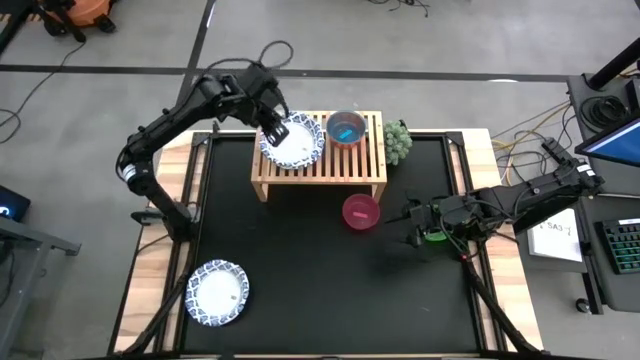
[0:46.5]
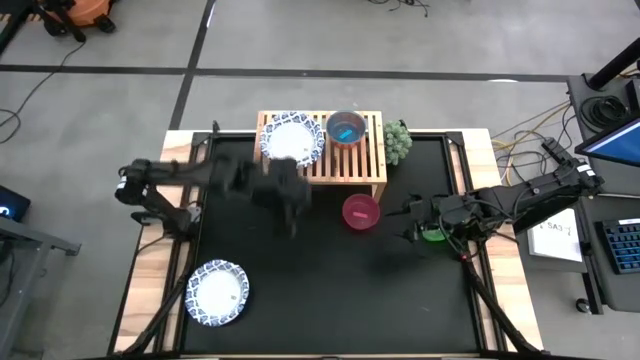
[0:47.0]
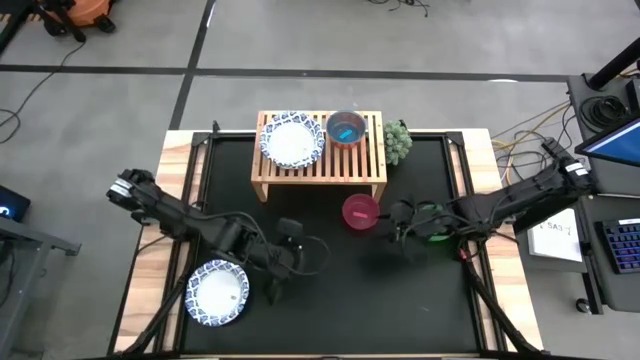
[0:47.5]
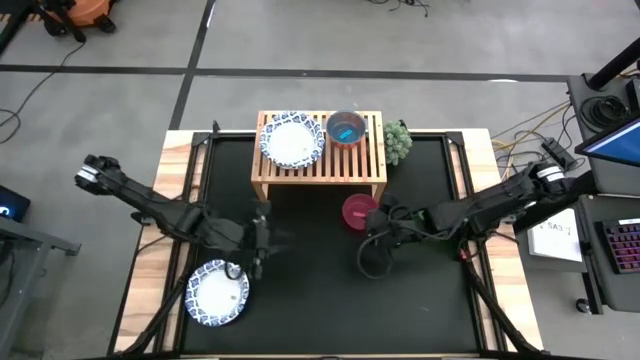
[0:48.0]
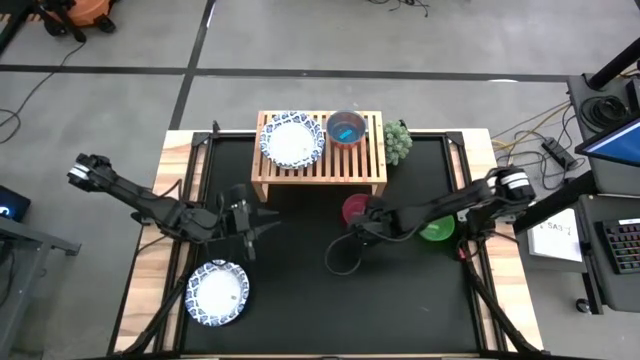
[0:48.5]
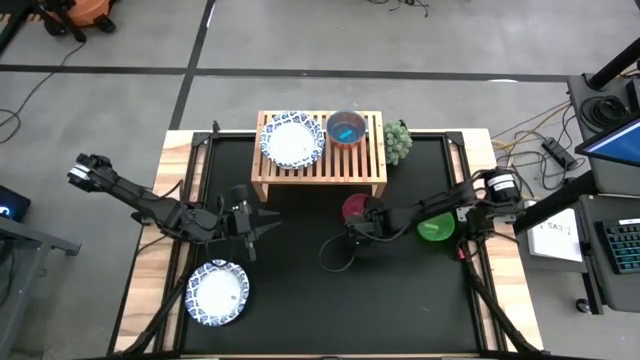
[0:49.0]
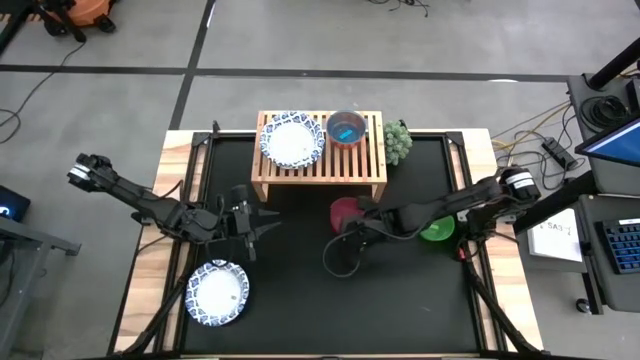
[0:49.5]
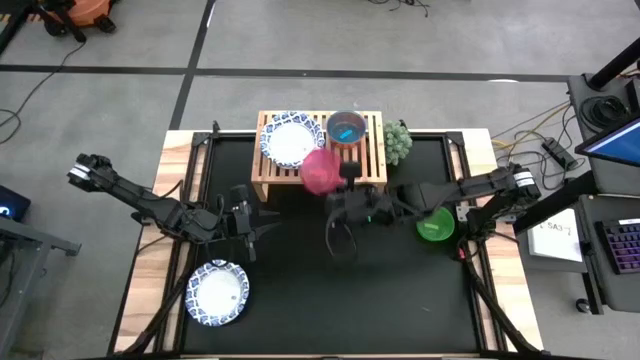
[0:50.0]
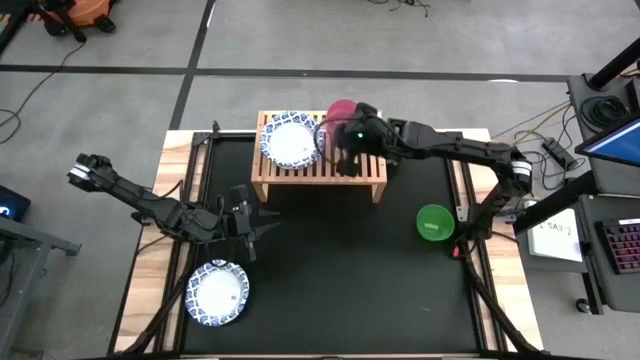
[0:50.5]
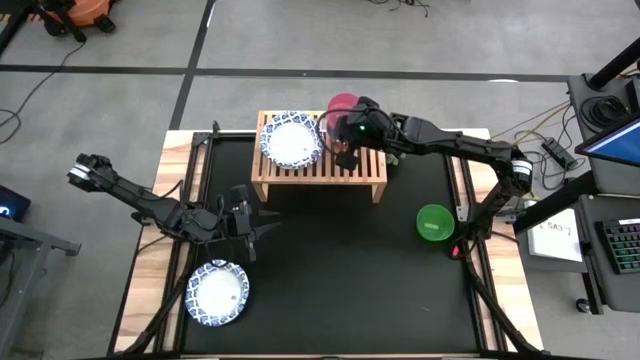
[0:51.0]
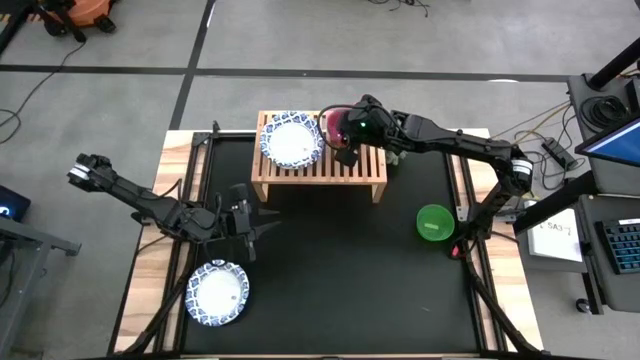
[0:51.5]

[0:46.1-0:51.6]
Task: Place and stack bowls onto a shelf
Stack the pink bowl on top of the other blue bowl on the shelf

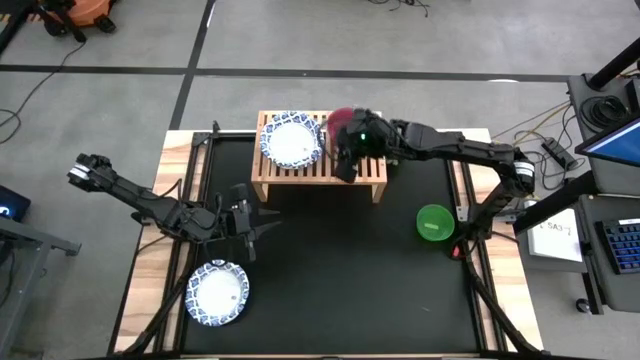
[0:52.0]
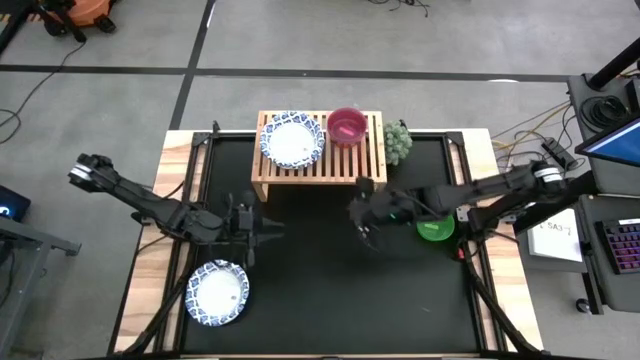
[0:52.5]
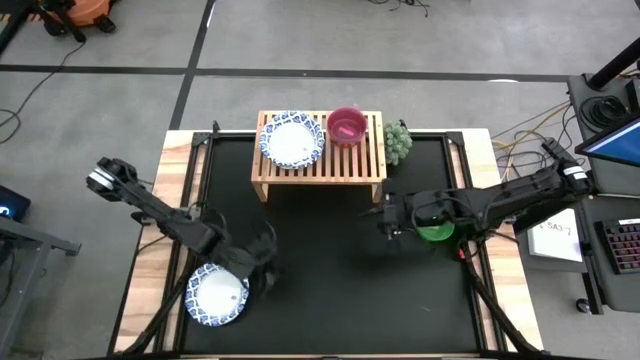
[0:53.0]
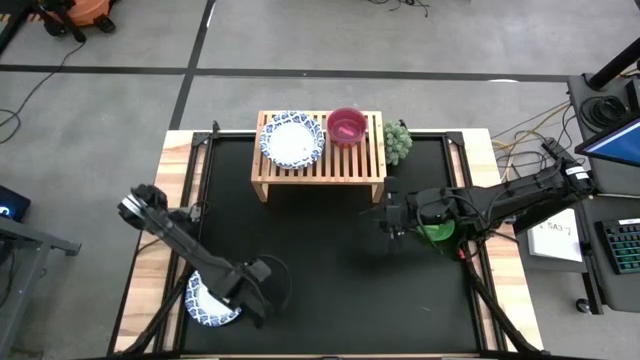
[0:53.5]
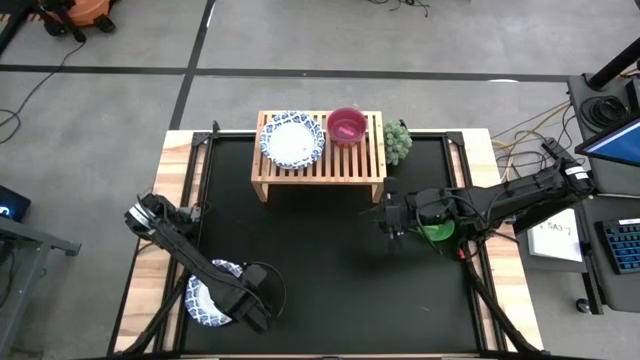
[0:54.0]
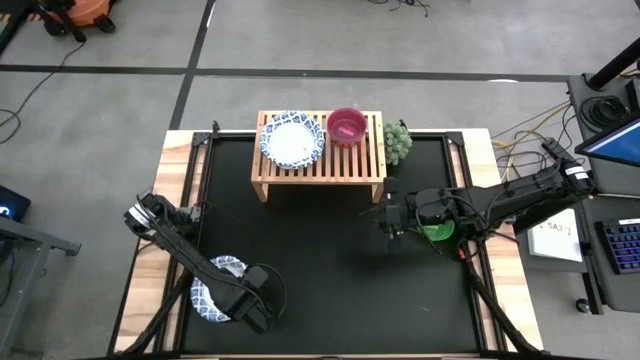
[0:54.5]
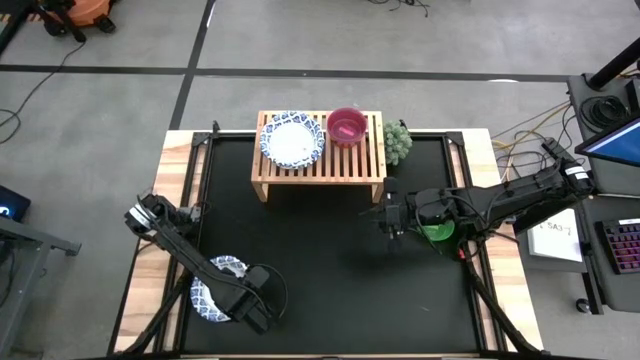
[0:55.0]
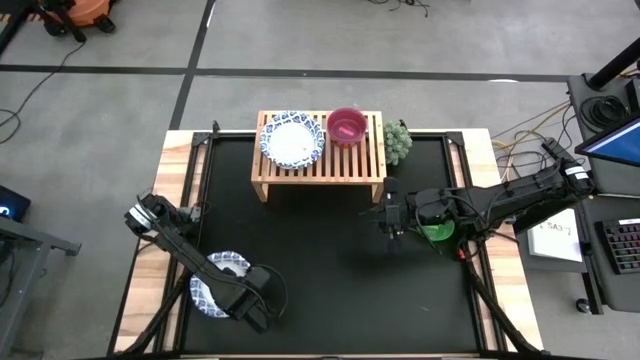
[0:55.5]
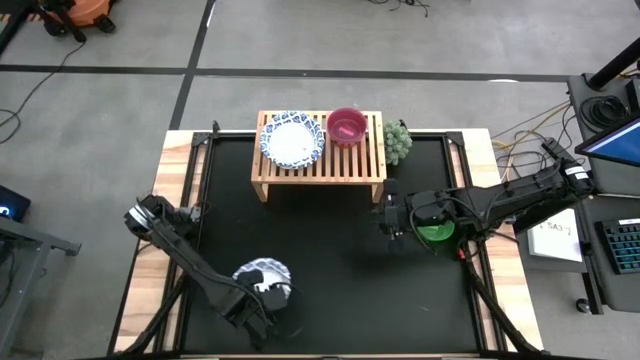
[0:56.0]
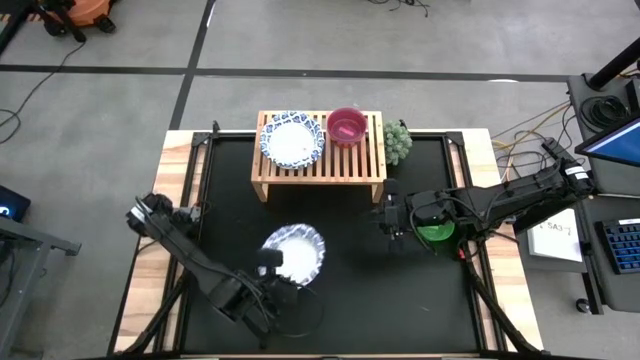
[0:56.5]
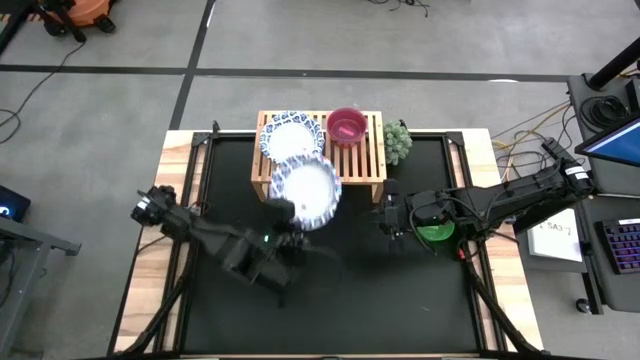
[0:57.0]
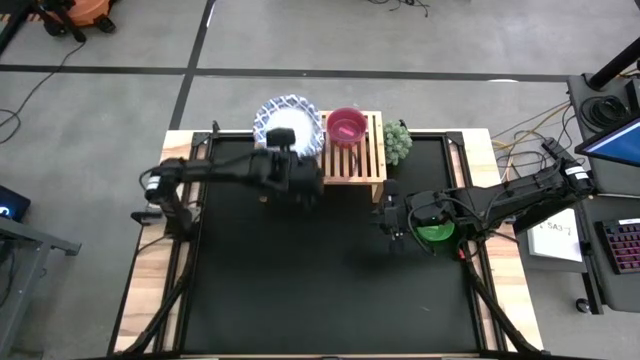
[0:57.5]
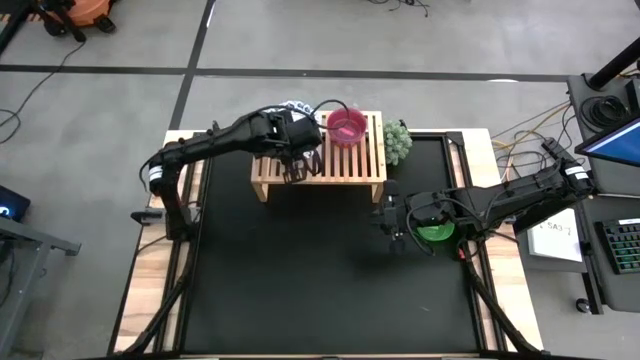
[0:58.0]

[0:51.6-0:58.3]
Stack the white patterned bowl on top of the other white patterned bowl on the shelf

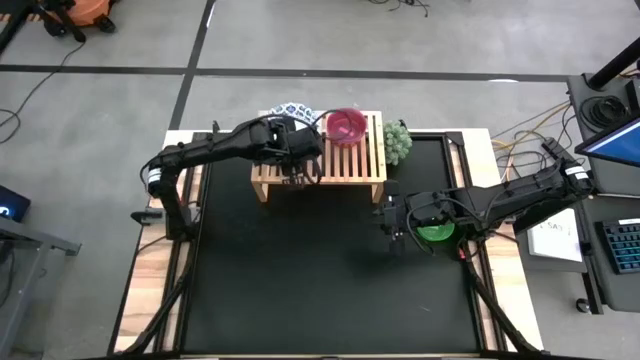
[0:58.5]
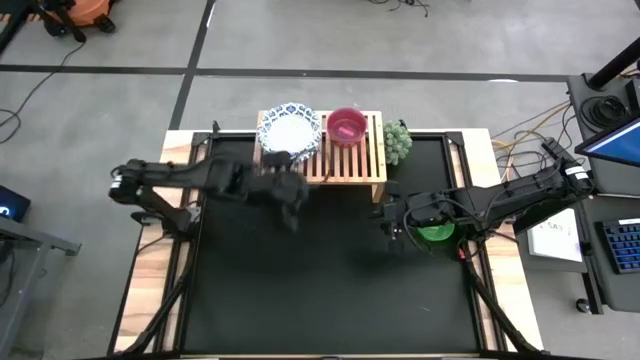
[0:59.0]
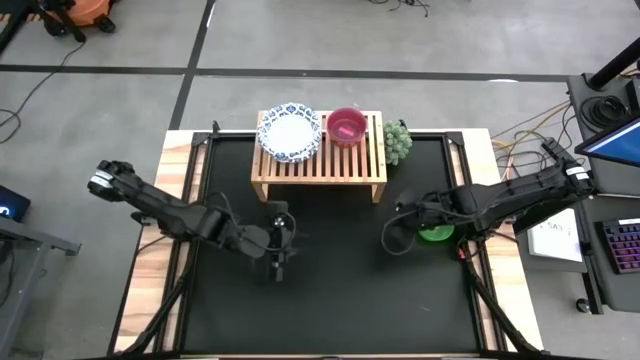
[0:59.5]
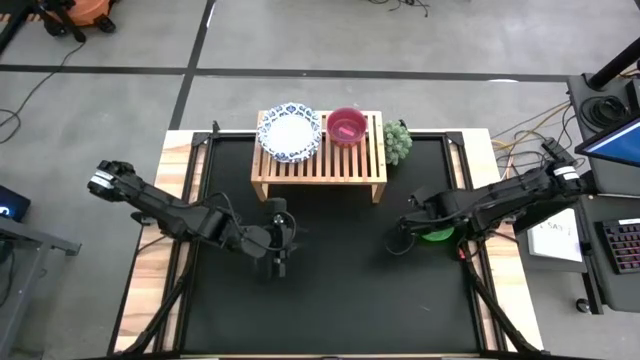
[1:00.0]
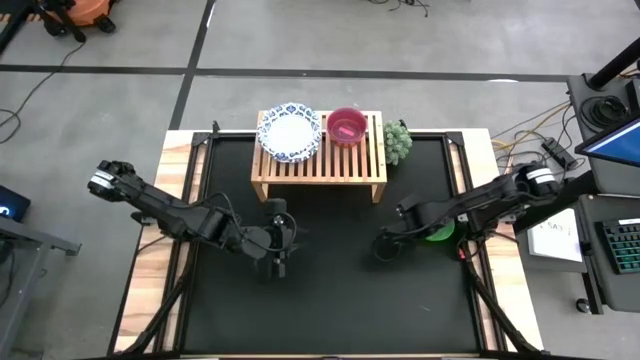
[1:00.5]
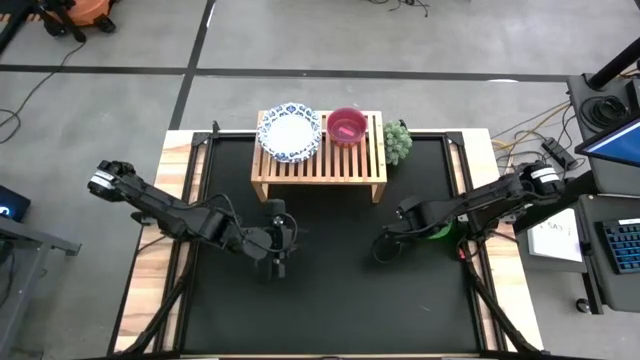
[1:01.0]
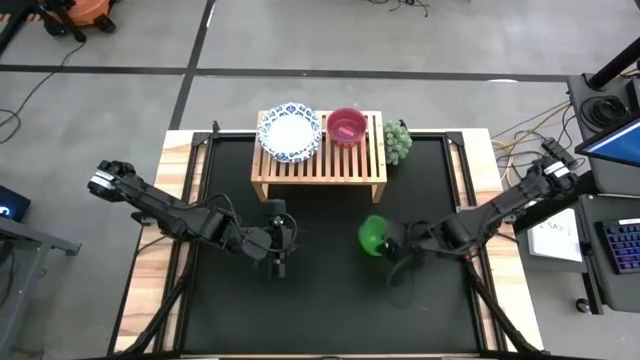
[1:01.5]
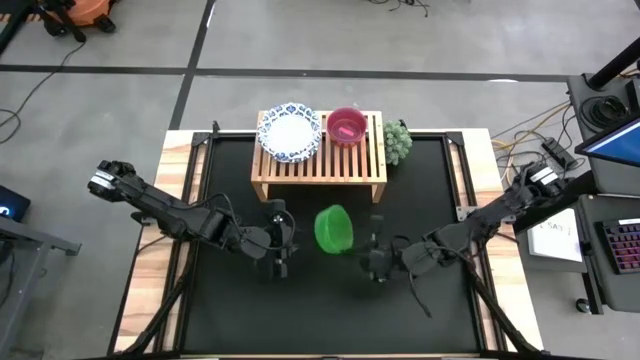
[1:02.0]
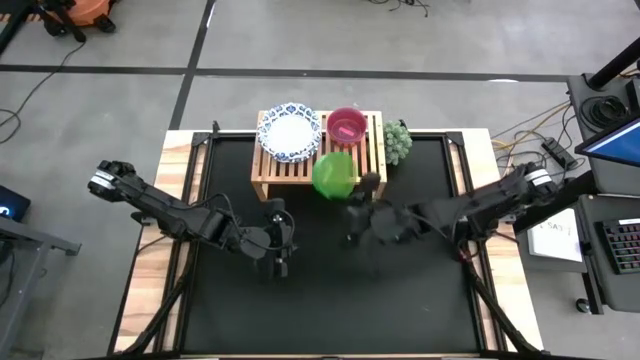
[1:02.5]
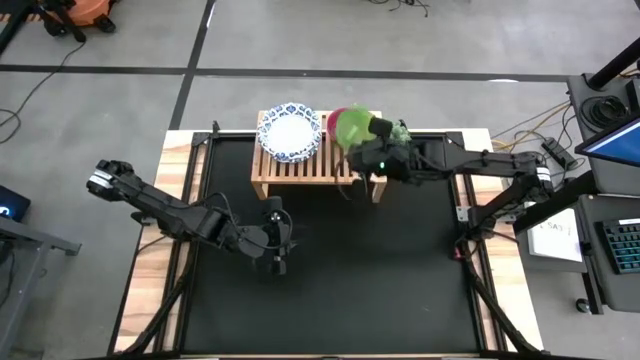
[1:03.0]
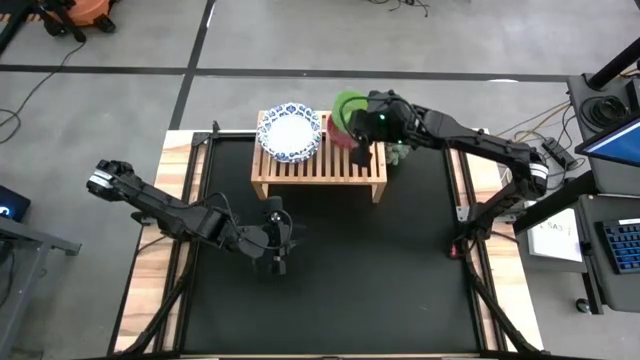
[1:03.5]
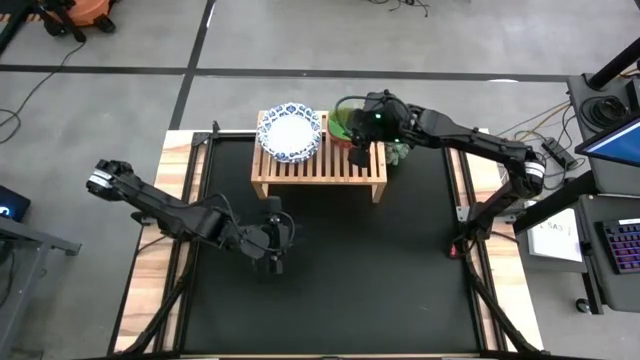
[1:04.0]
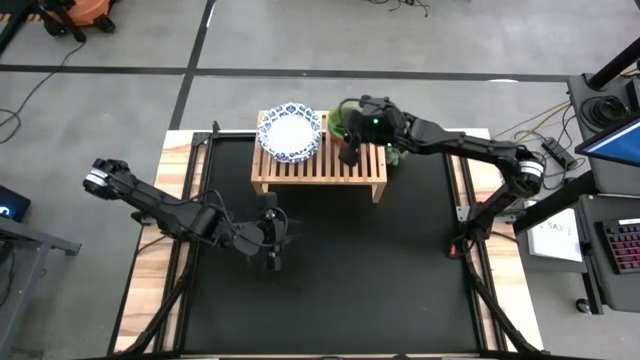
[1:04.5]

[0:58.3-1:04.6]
Stack the green bowl on top of the pink bowl on the shelf

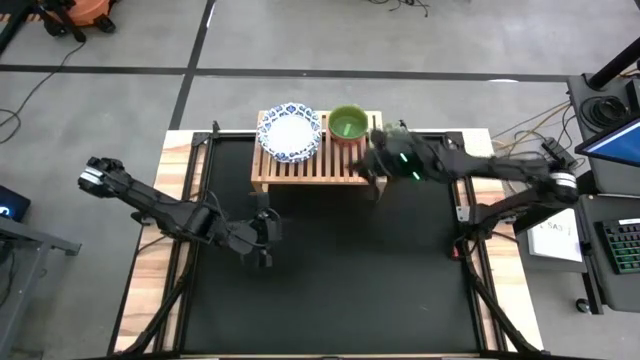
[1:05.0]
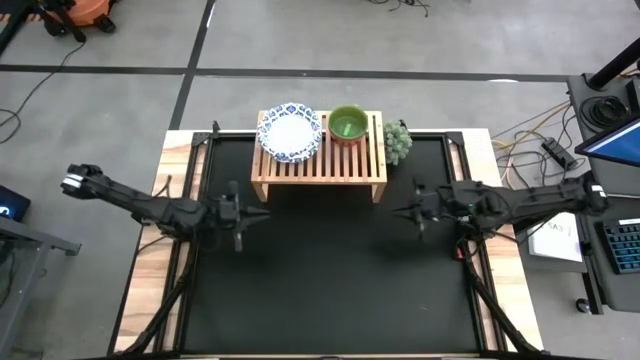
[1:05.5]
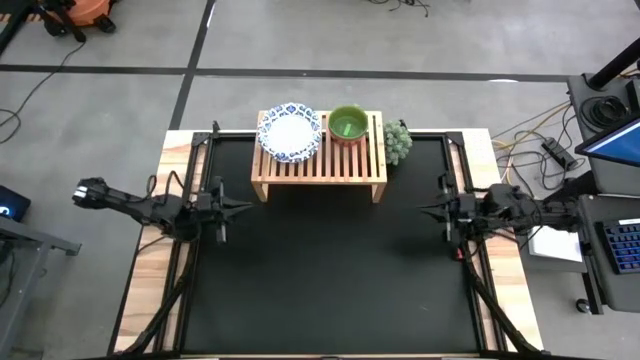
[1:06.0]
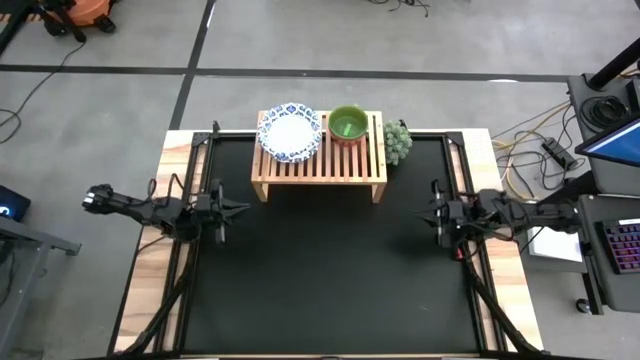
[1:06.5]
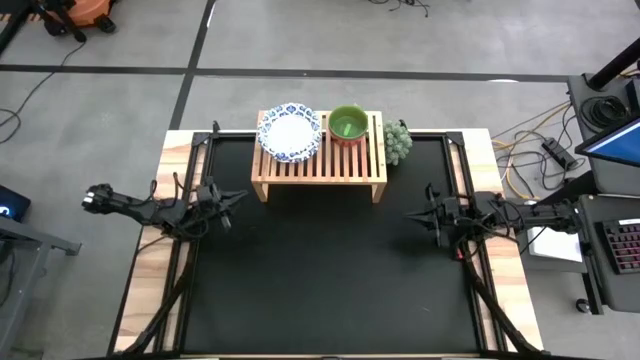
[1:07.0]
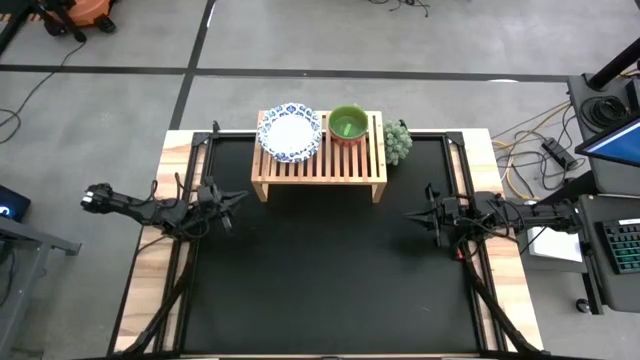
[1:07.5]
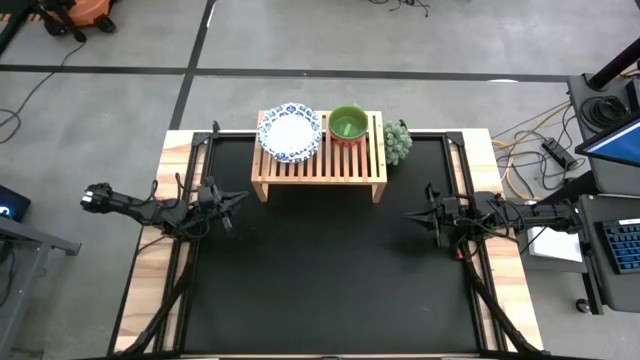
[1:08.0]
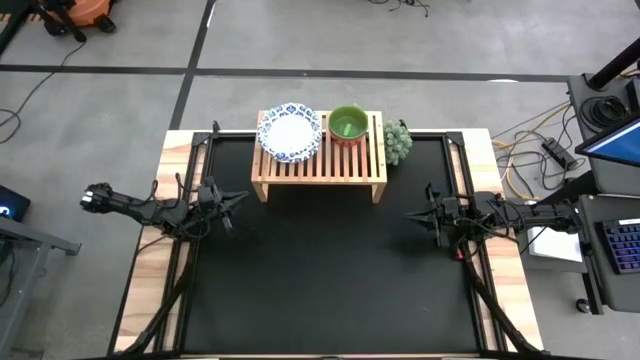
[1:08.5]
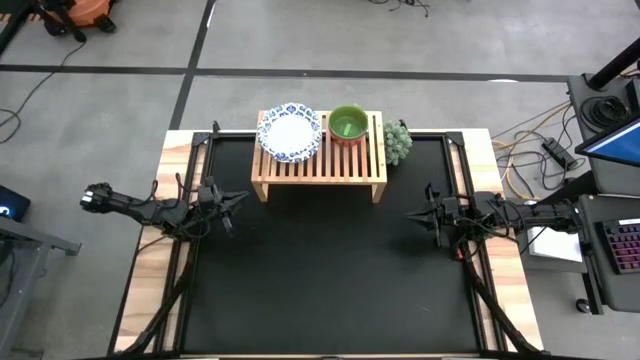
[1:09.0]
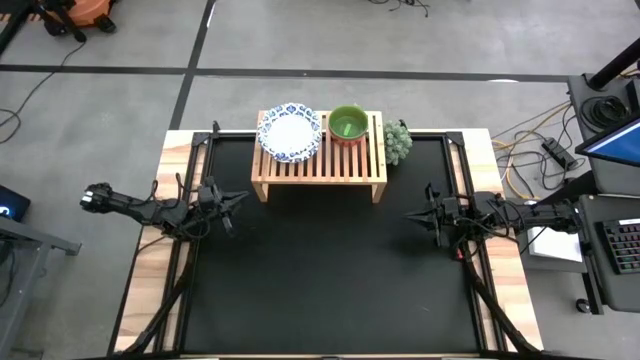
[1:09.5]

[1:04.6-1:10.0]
Return to Home Position
